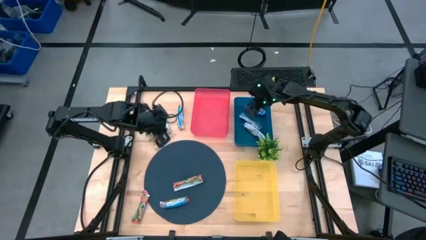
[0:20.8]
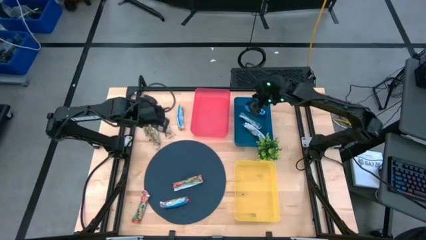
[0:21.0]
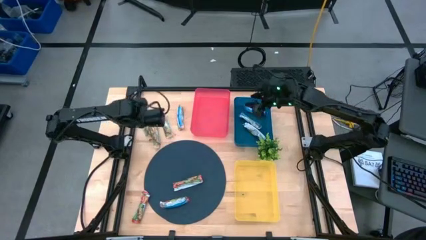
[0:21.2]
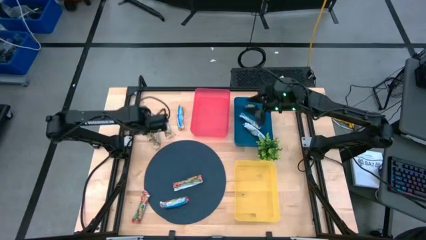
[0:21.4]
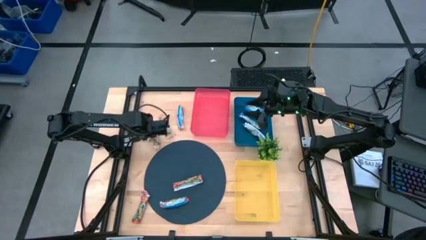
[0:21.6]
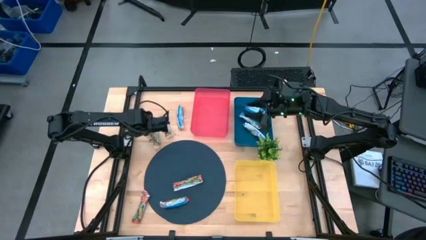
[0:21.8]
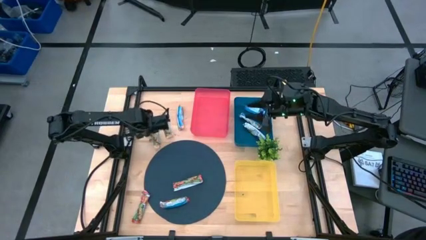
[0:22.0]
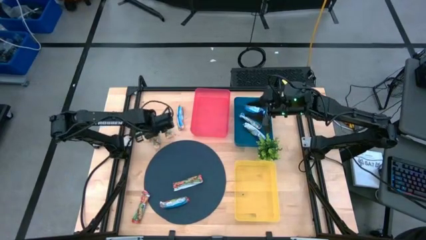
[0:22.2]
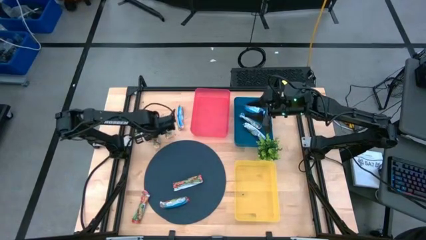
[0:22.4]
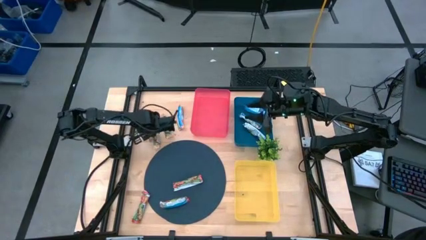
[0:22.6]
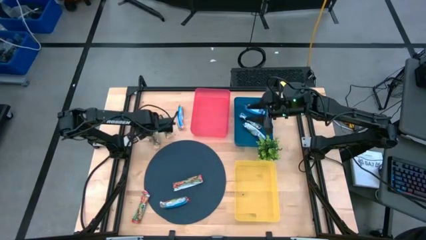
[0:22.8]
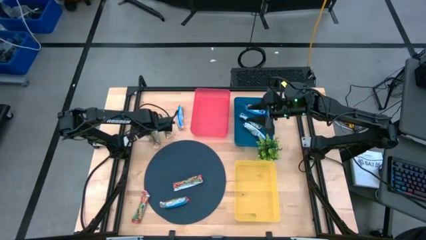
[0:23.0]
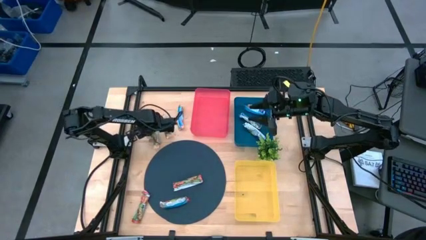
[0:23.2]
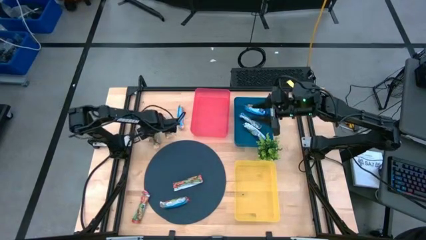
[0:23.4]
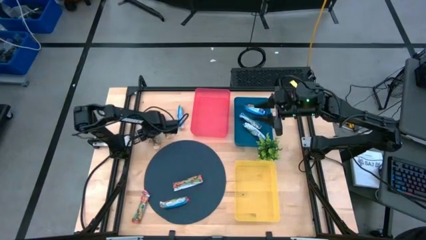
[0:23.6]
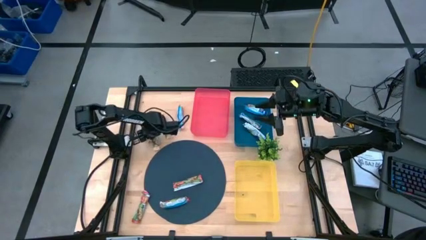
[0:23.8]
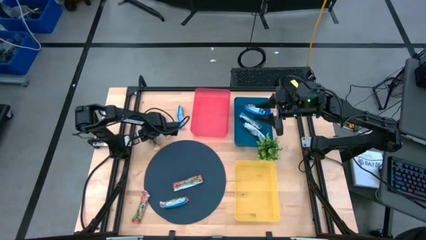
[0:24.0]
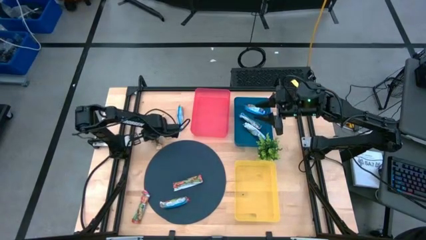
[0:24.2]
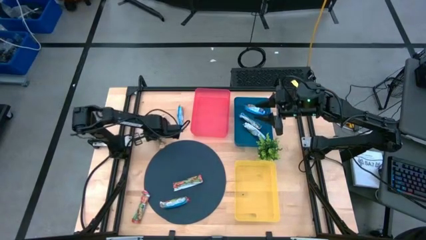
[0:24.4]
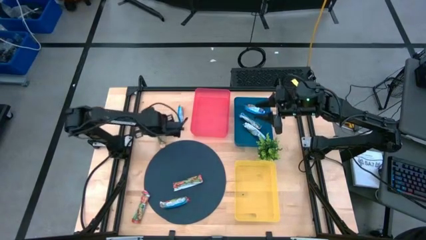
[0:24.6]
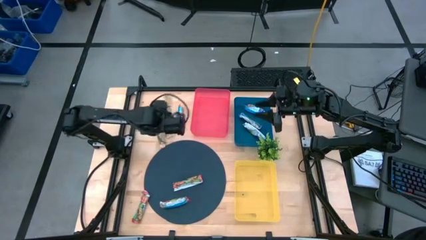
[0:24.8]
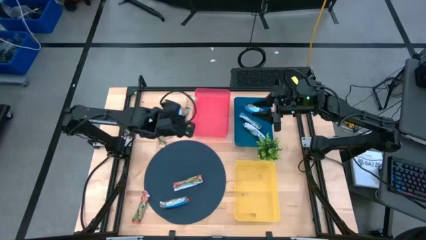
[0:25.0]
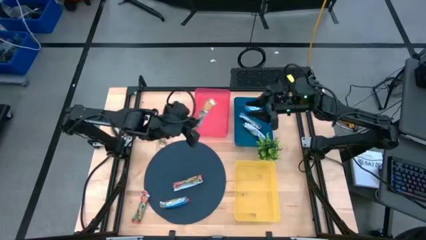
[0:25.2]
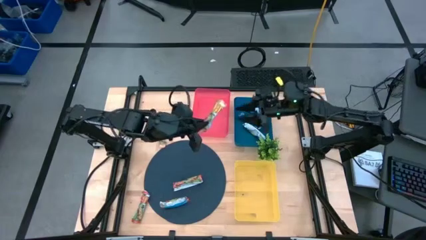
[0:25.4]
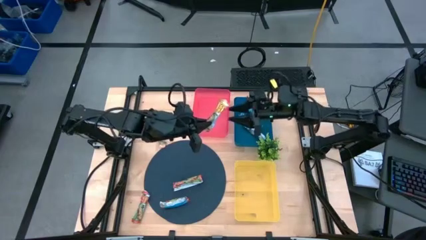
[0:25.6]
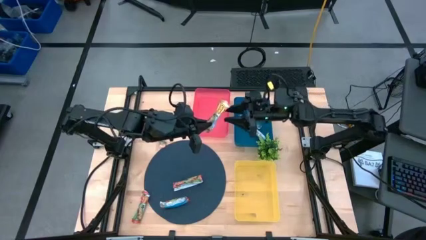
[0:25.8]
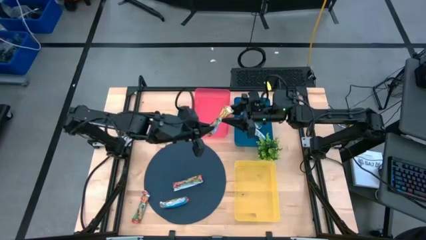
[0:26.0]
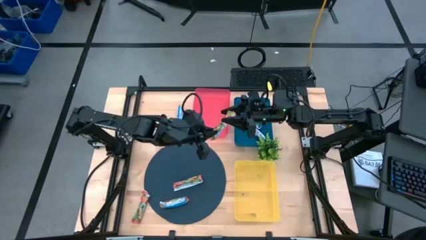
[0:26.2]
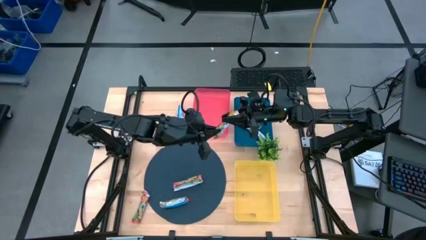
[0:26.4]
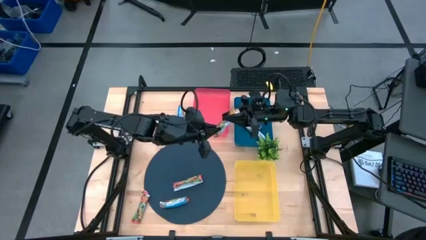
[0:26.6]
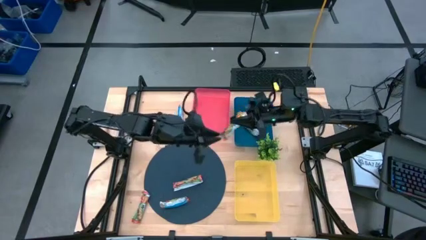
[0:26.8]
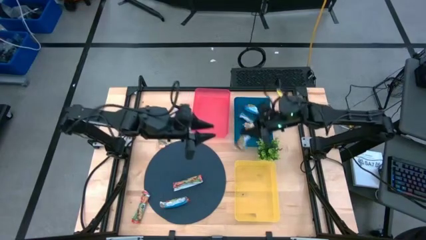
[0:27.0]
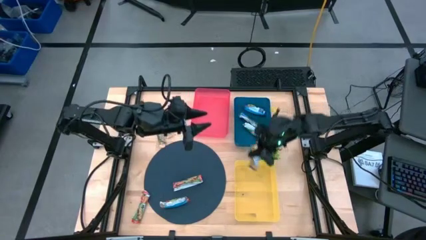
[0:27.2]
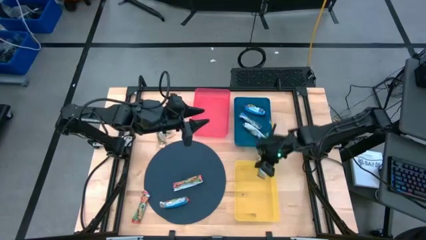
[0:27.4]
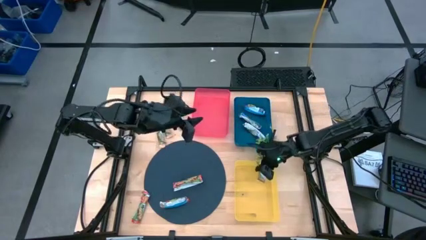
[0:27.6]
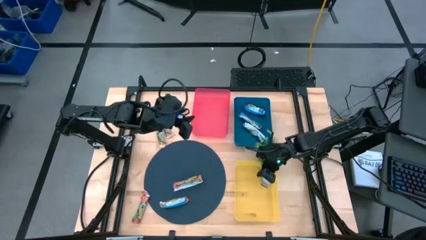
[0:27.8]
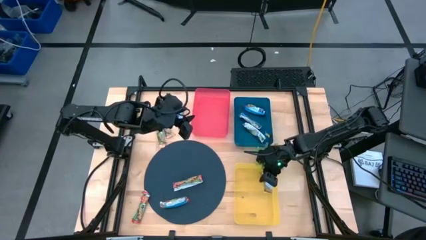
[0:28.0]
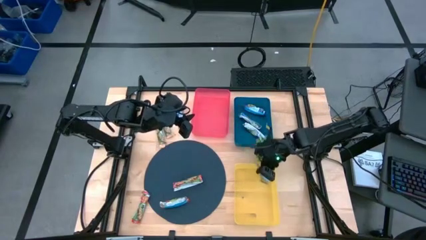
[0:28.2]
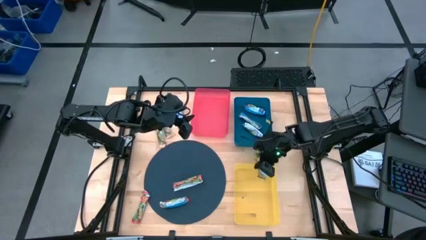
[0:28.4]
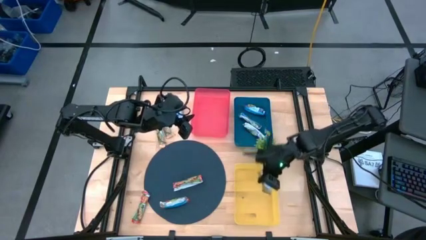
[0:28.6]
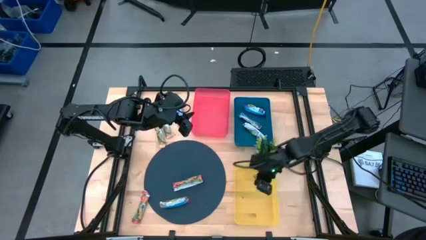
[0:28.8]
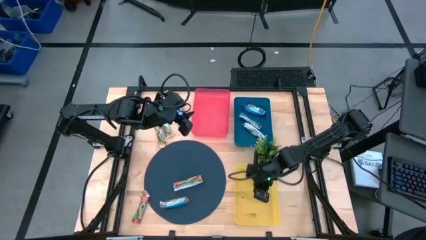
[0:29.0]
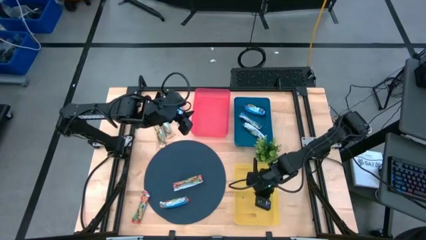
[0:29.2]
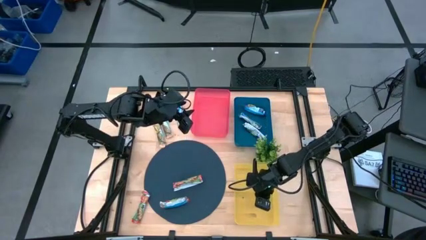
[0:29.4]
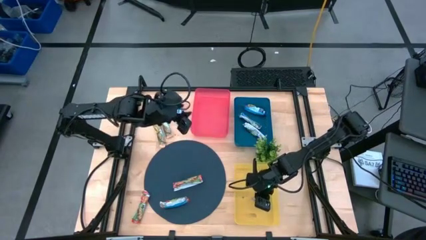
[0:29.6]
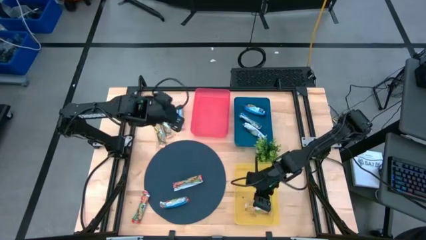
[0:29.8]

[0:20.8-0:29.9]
Task: Pick and place Granola Bars by type
Put the yellow granola bar into the yellow bin

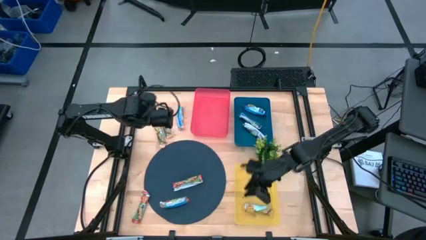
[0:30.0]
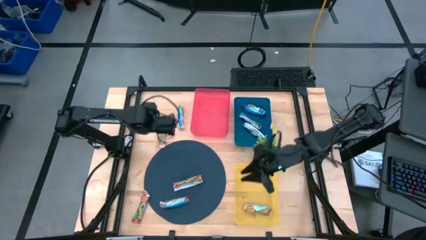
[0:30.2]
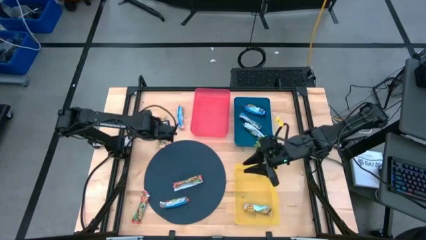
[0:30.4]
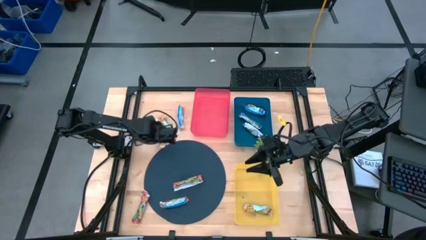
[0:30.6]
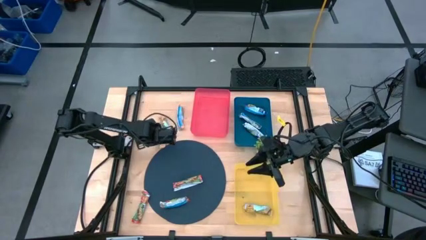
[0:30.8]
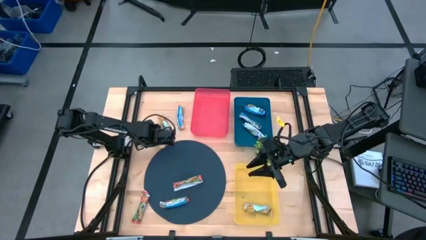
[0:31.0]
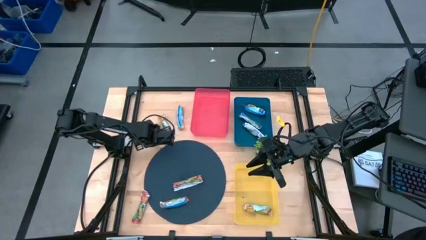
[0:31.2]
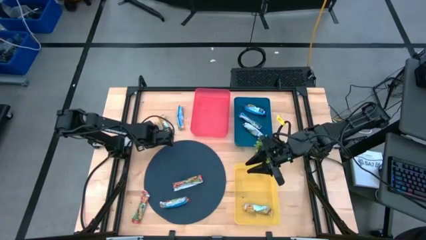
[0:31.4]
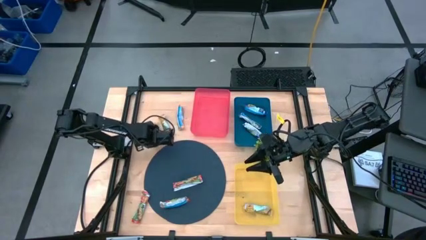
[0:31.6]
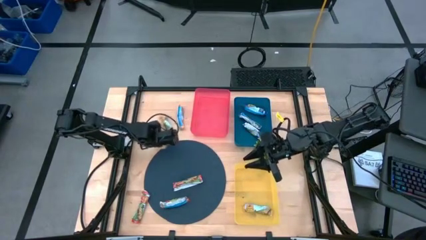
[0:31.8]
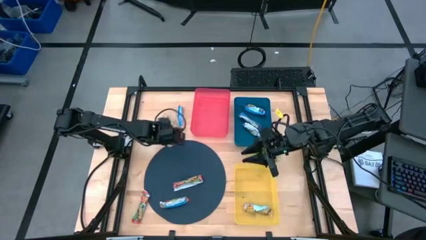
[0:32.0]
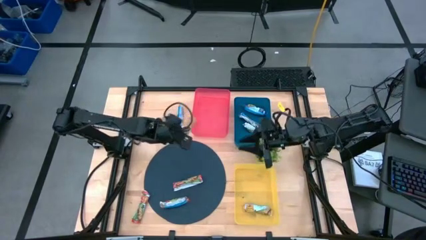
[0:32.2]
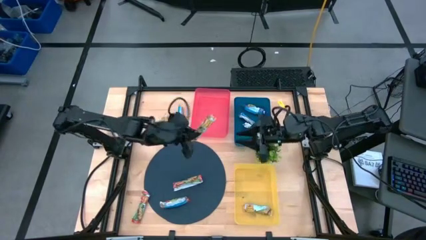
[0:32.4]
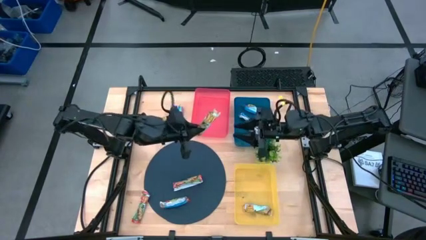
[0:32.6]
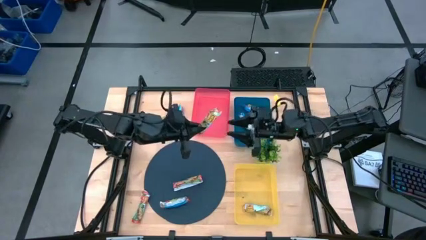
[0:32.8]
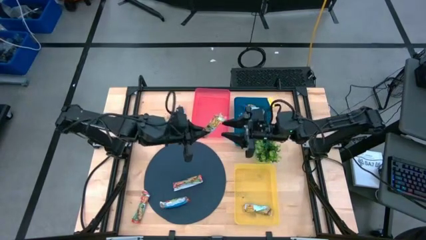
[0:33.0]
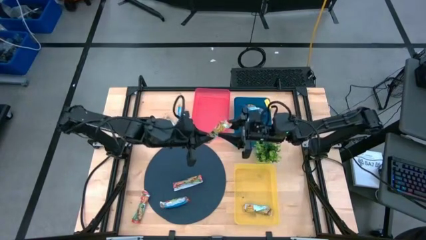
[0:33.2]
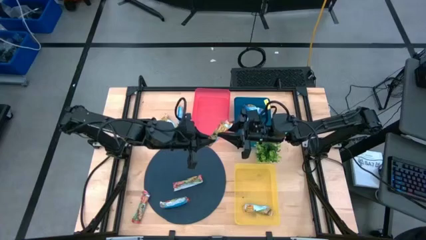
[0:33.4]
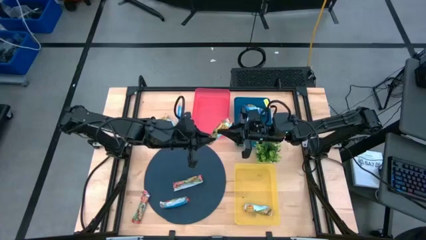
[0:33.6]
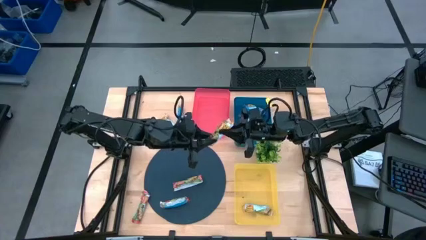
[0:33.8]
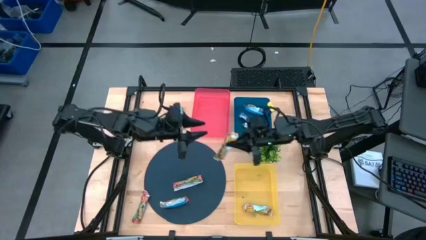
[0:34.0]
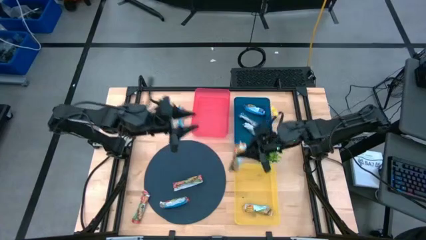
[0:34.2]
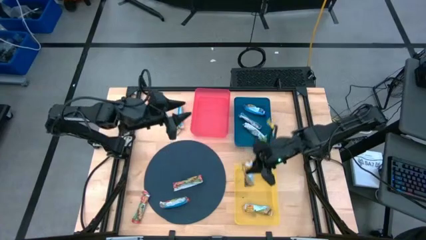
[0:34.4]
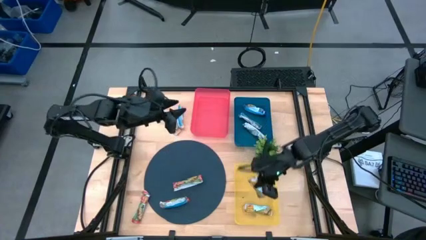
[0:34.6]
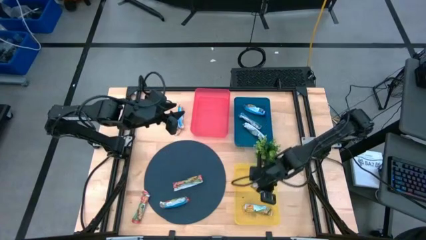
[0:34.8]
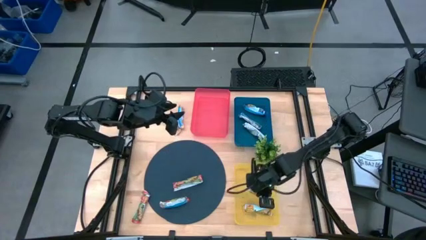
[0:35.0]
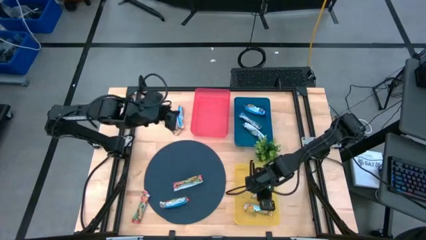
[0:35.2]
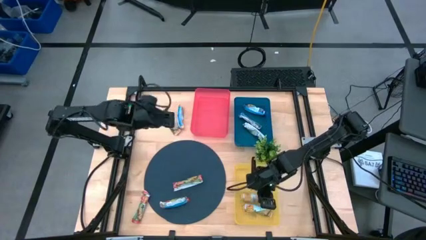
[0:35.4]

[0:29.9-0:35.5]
Put the yellow granola bar into the yellow bin

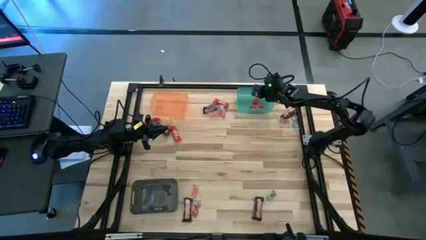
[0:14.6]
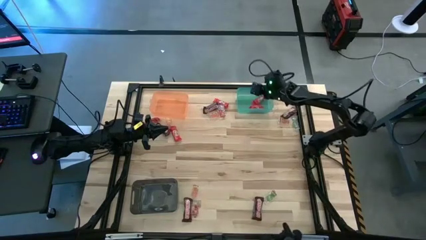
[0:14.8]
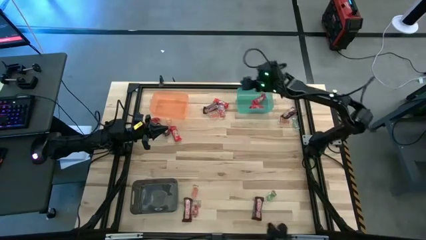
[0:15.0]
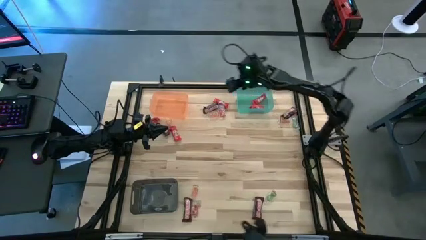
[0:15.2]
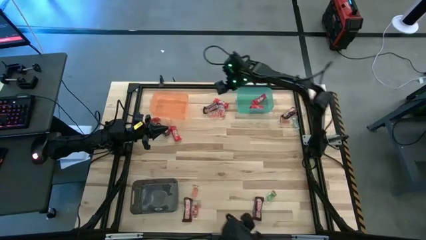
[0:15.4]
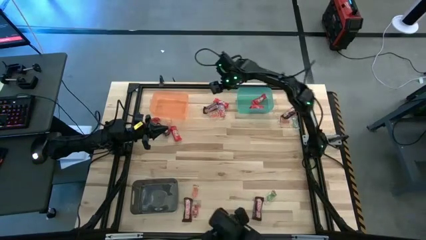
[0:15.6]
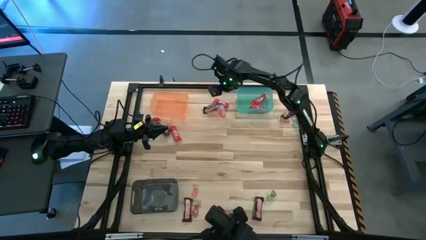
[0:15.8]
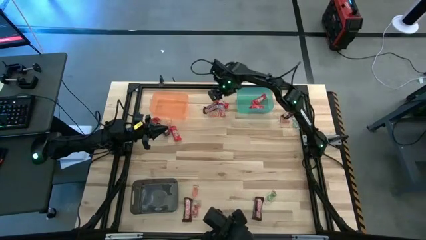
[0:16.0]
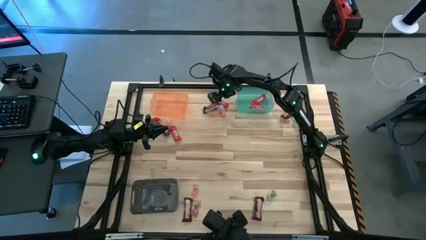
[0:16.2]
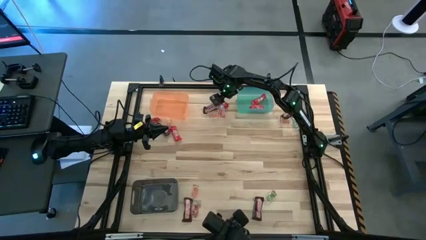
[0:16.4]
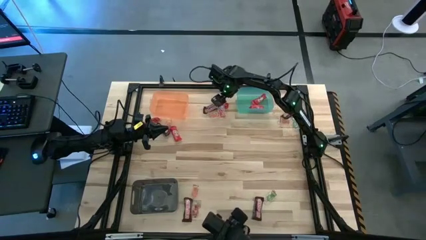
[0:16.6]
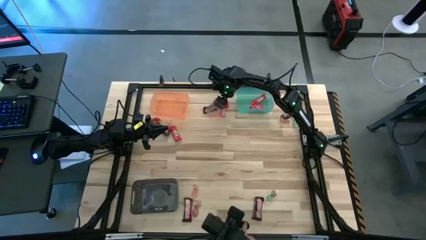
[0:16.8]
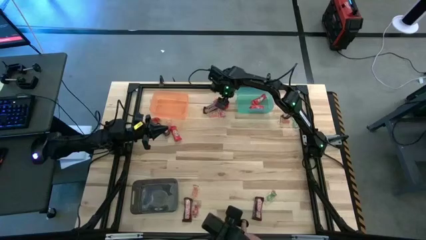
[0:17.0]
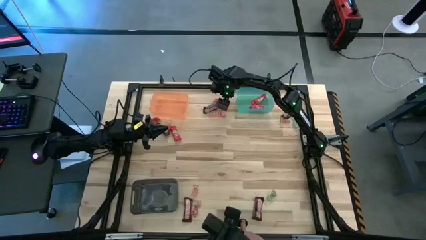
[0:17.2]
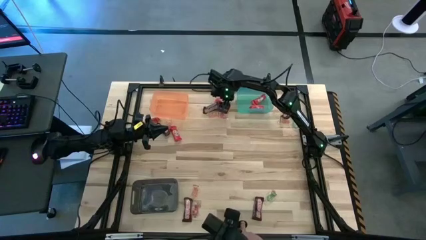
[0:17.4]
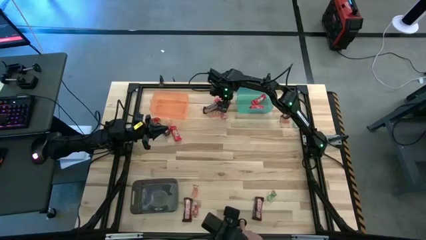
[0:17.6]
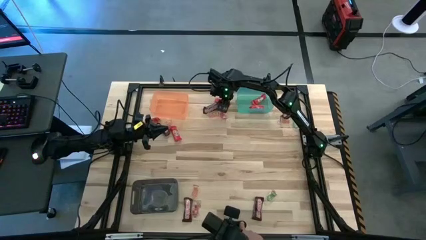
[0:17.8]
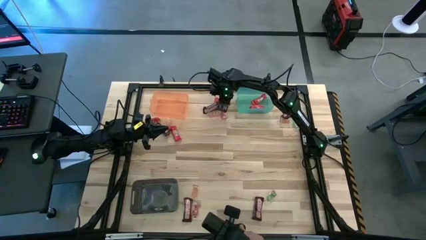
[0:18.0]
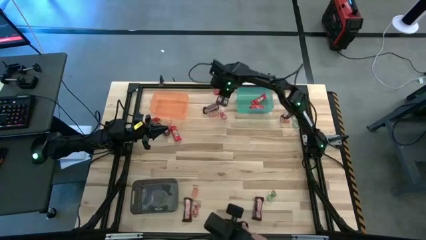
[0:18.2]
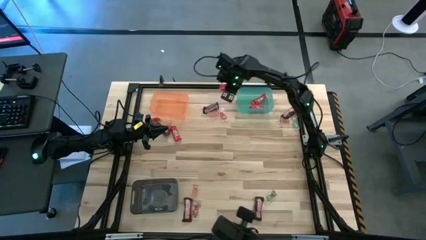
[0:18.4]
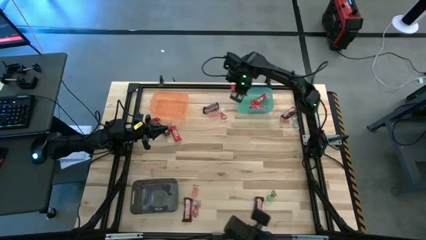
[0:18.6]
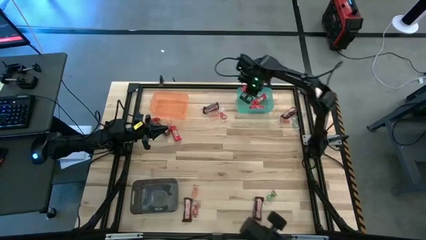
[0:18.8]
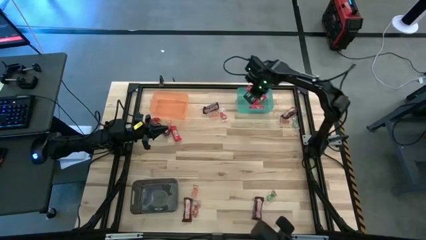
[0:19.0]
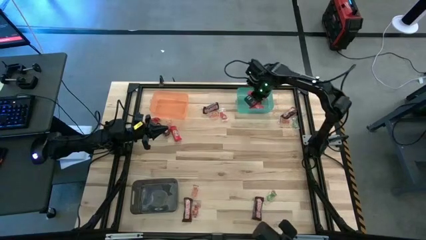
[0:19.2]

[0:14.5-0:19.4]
Task: Sort candy by brand, put in halloween buckets
Put the red chocolate bar into the blue bin
